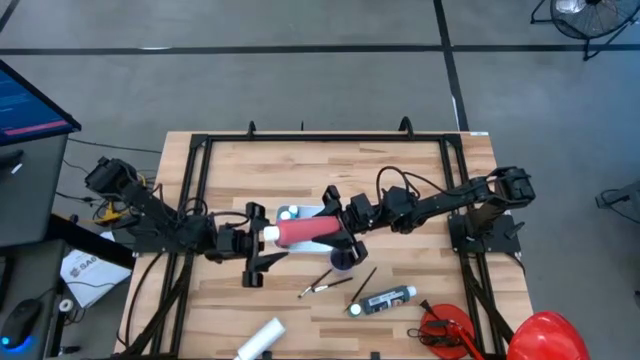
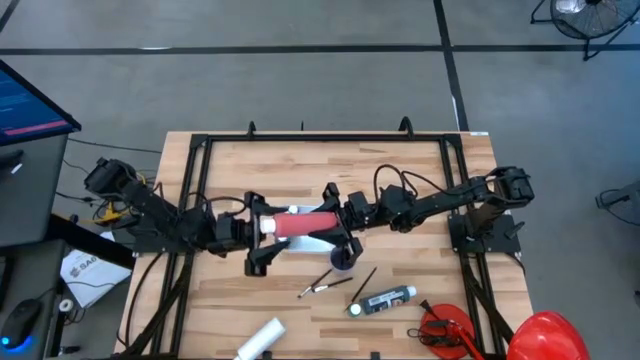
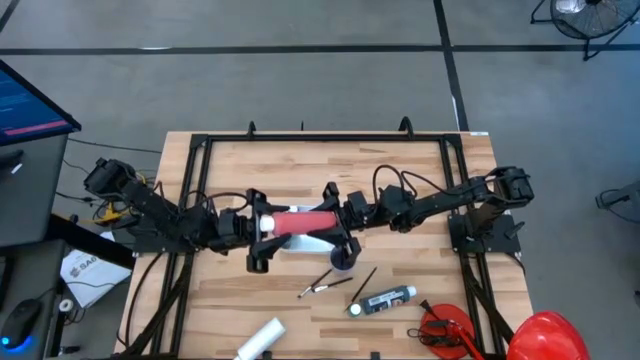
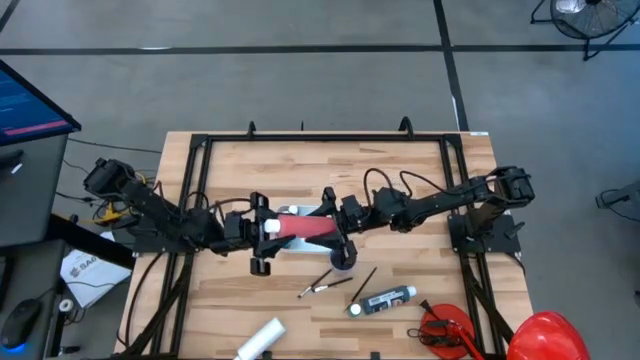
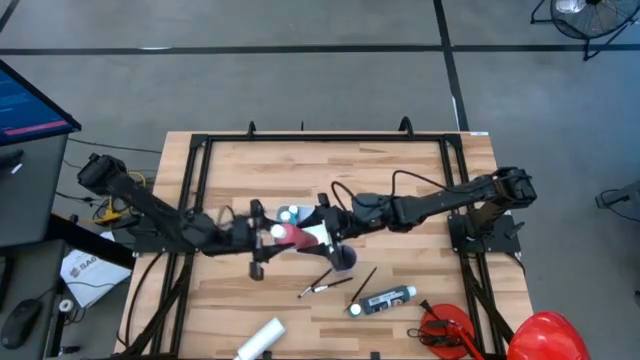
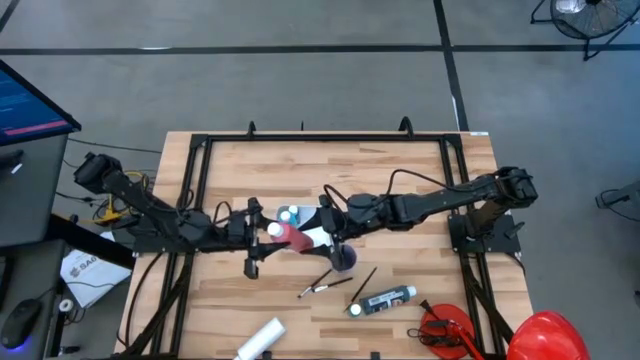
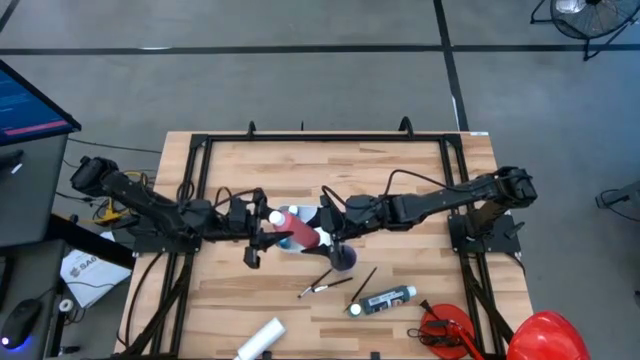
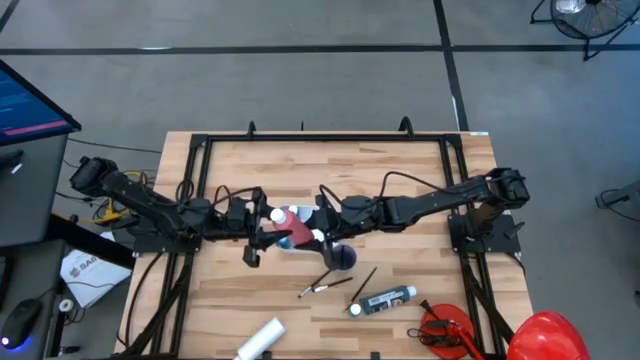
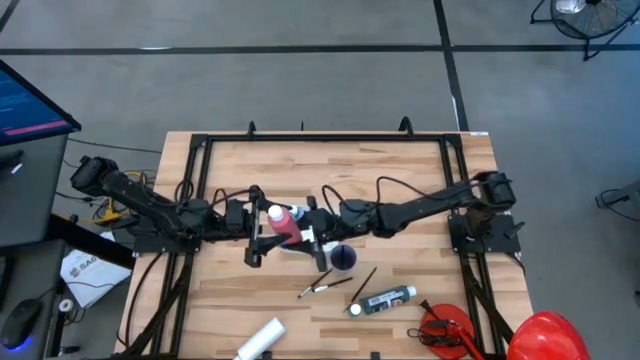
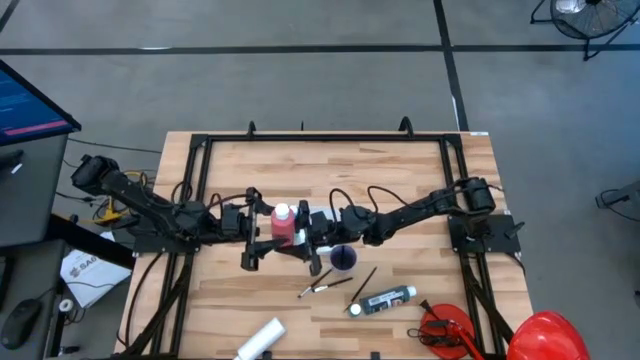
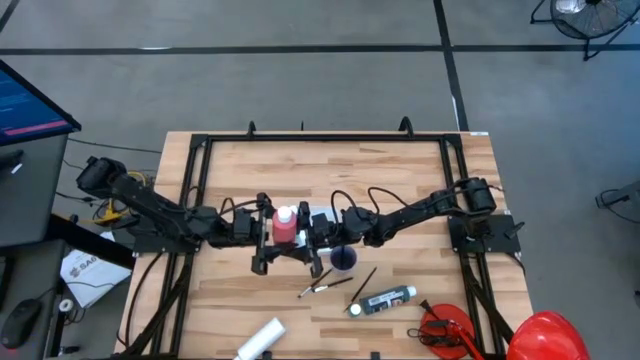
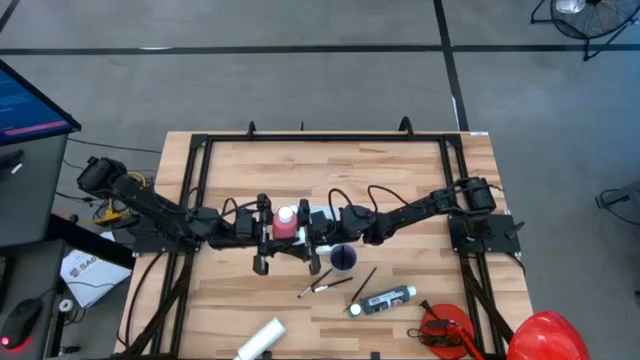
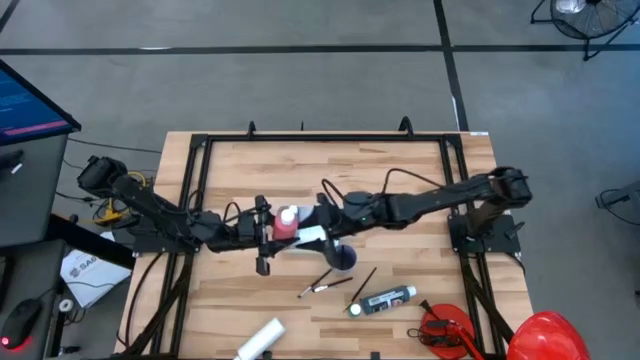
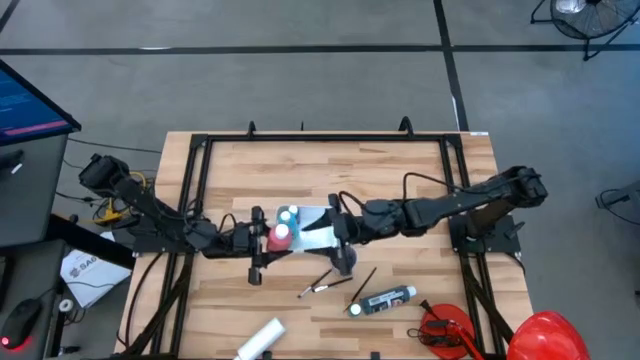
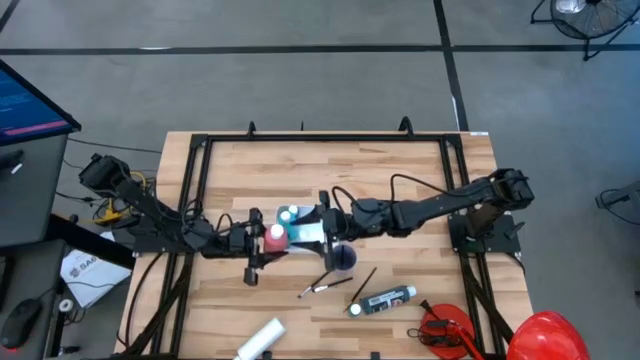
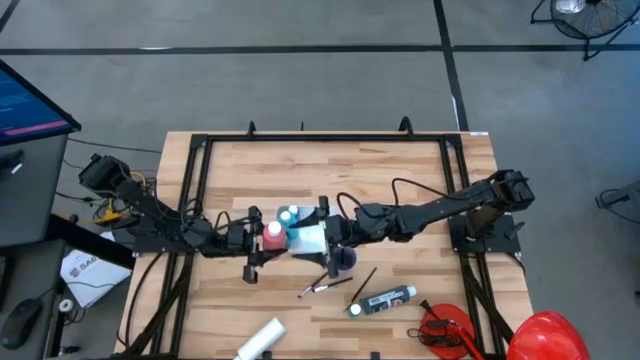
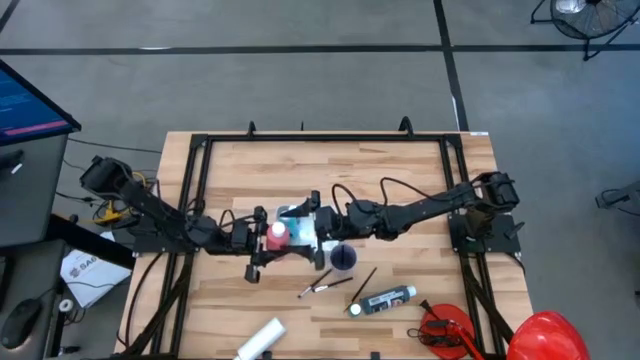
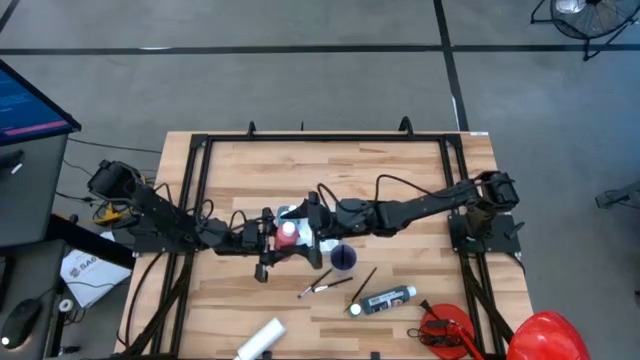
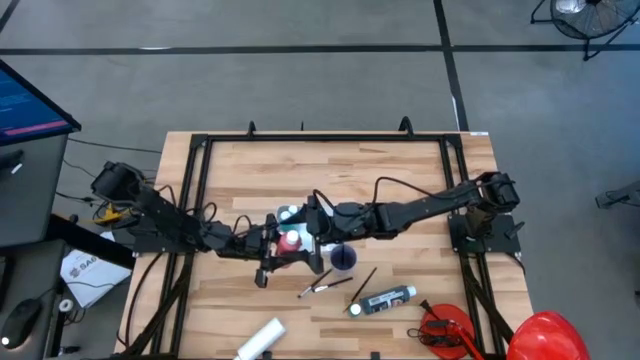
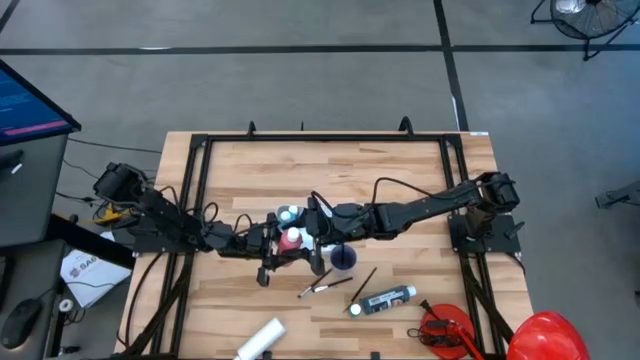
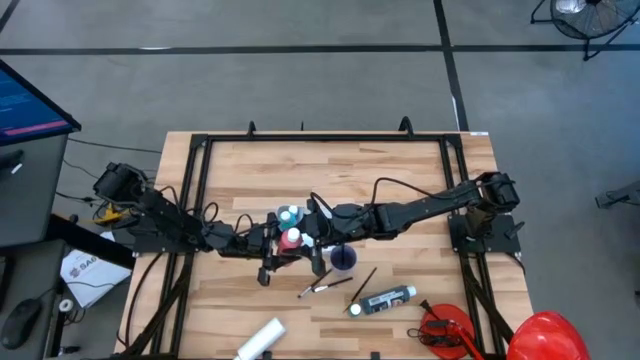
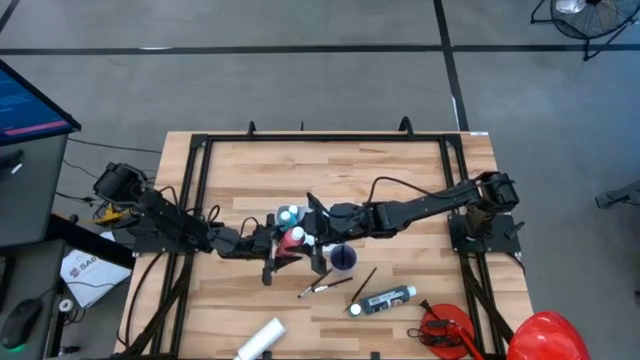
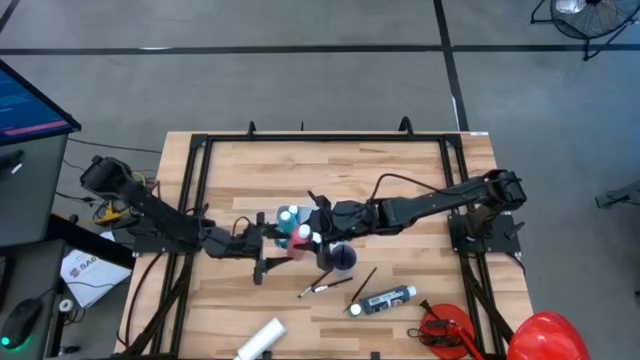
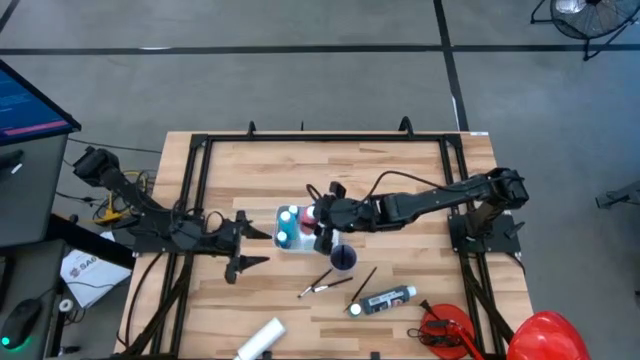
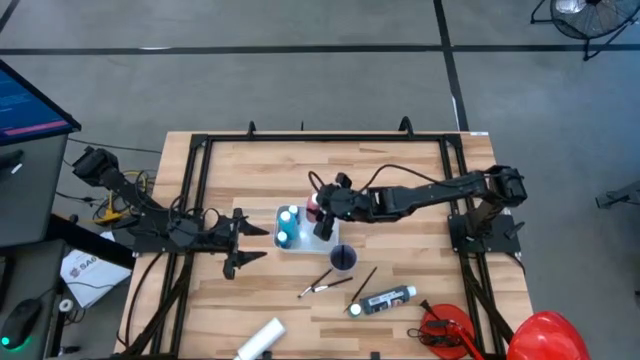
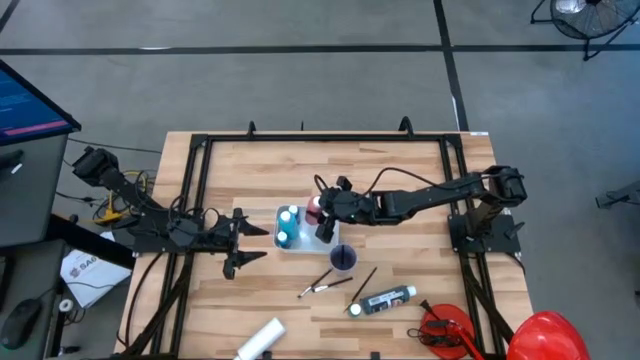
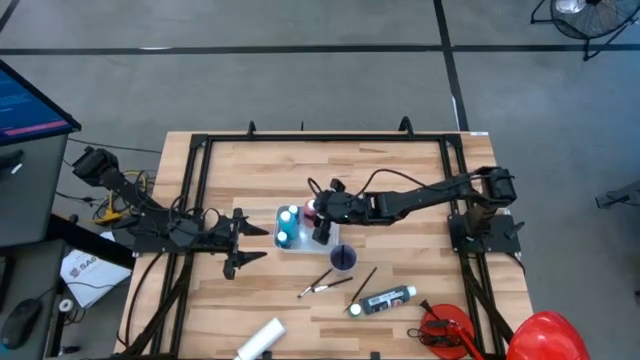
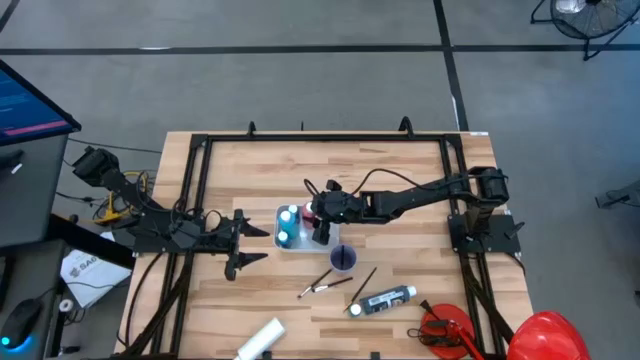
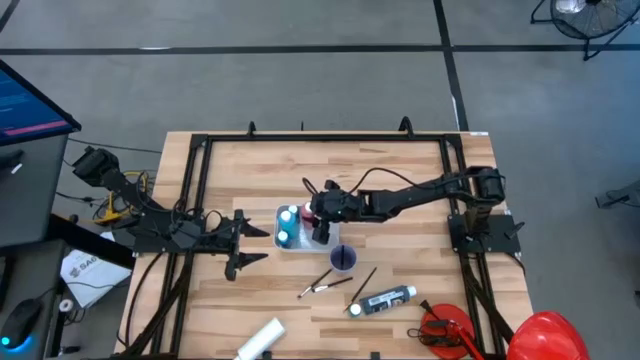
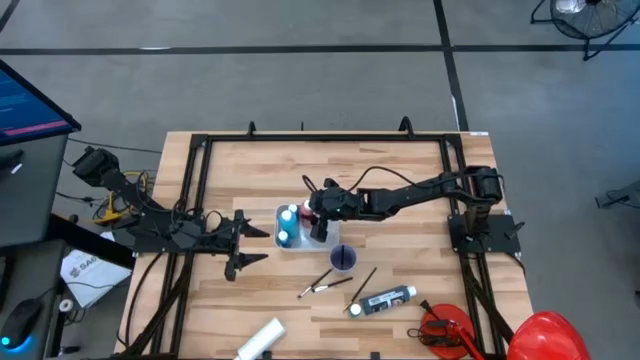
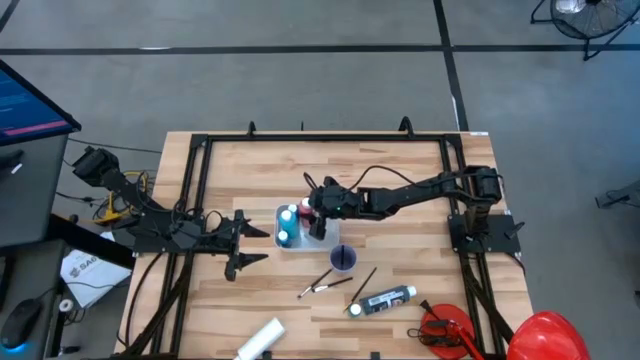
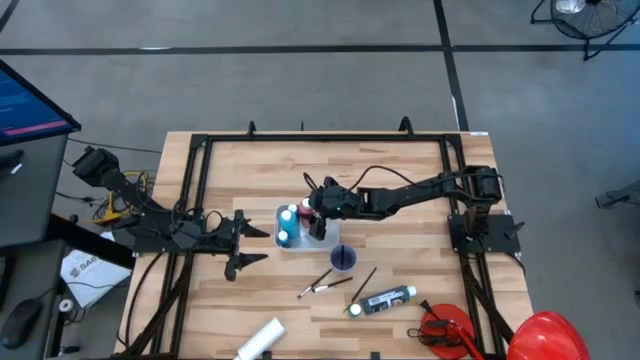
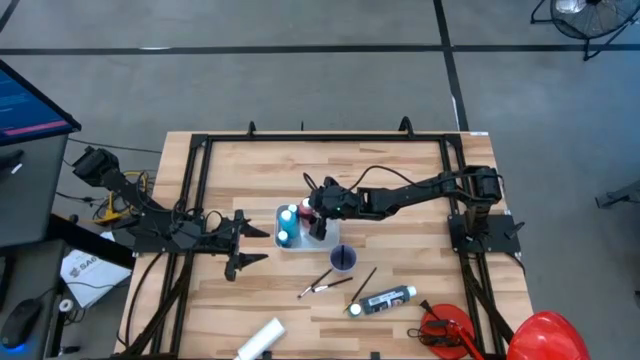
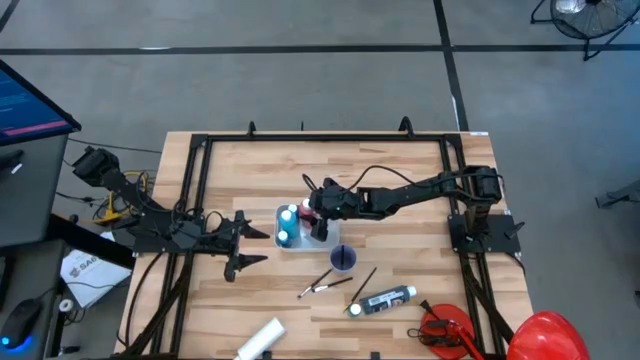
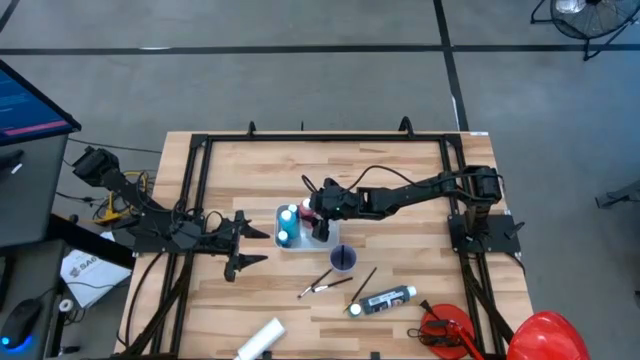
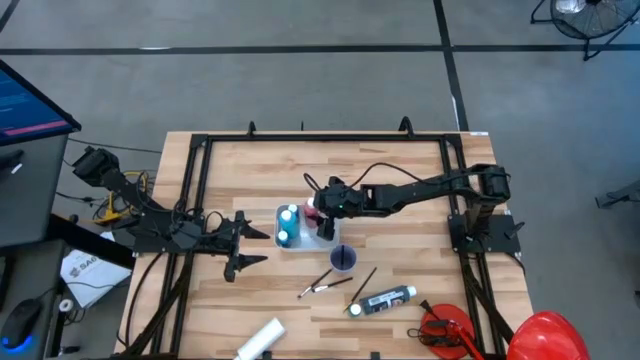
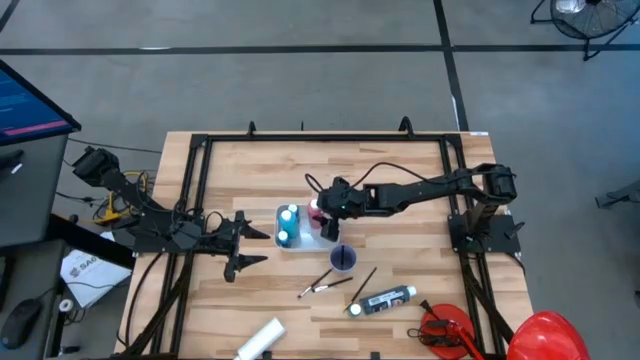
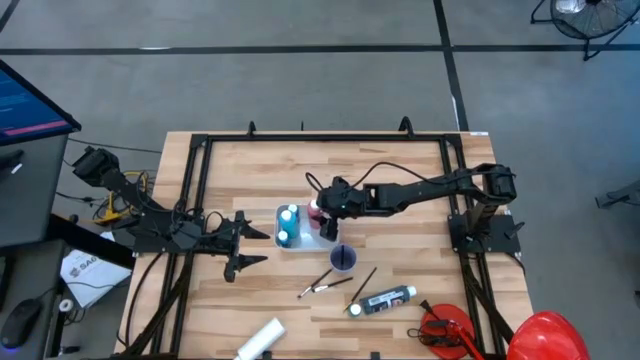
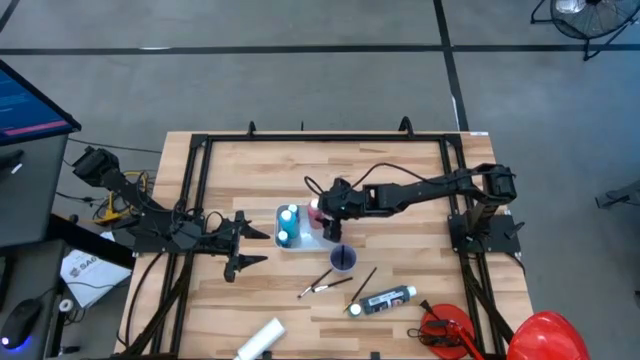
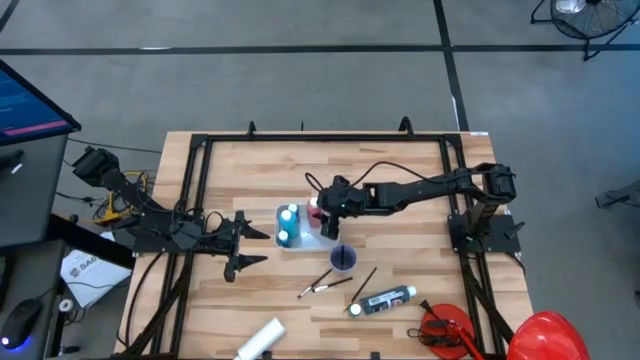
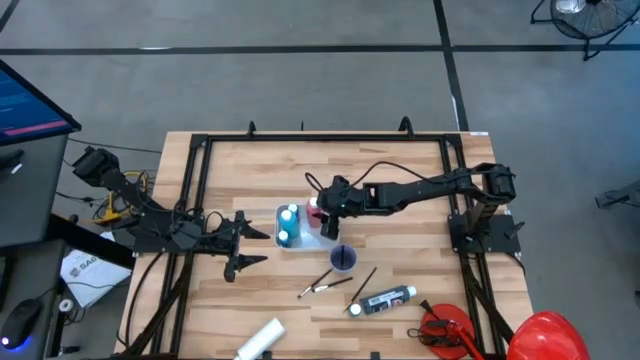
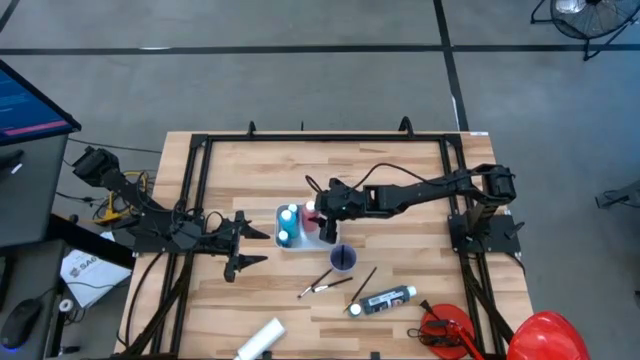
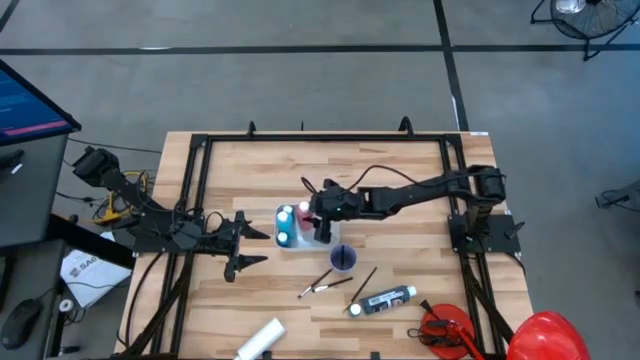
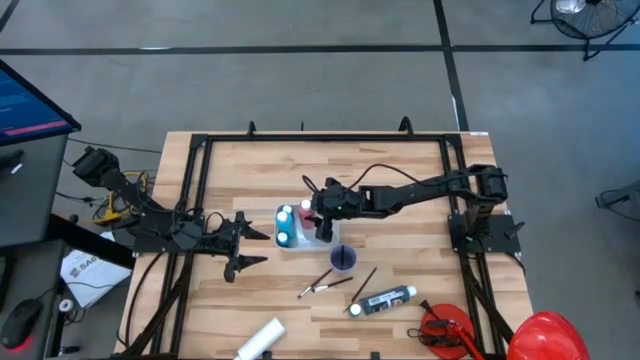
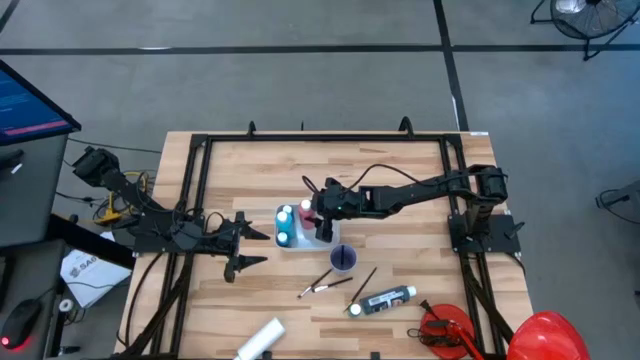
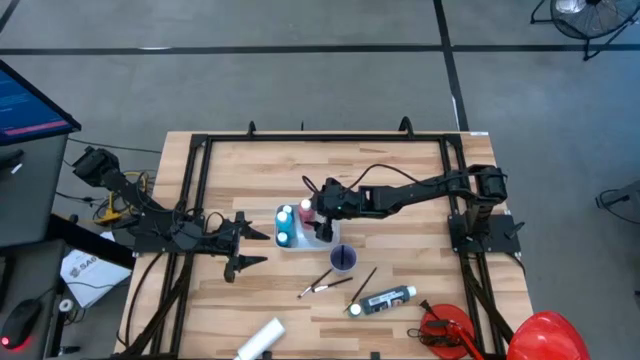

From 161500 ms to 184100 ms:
Task: Pick & Place Paint Supplies
Put the red paint bottle into the white bin
